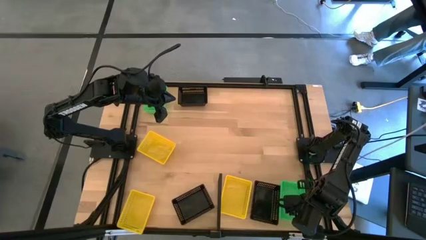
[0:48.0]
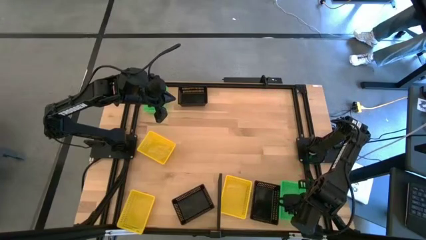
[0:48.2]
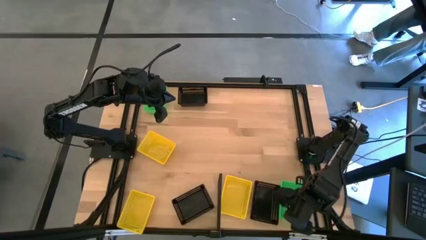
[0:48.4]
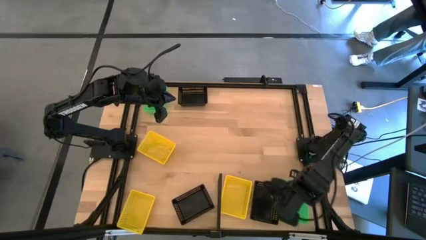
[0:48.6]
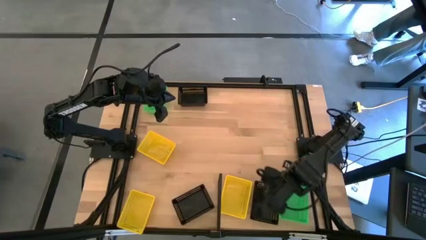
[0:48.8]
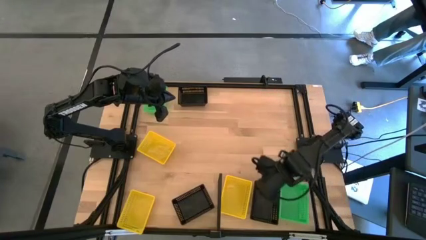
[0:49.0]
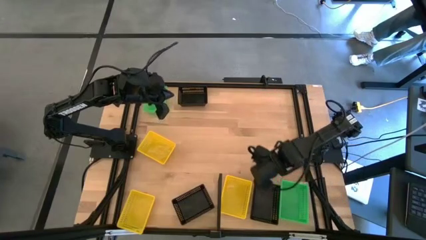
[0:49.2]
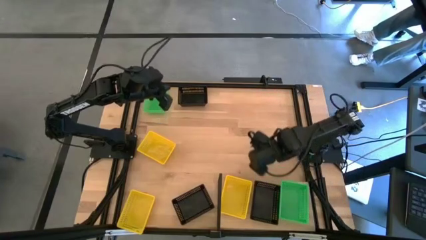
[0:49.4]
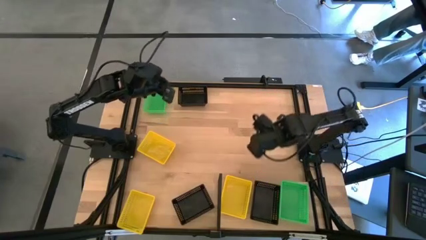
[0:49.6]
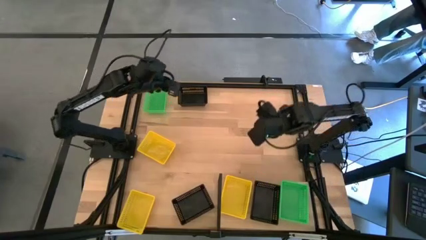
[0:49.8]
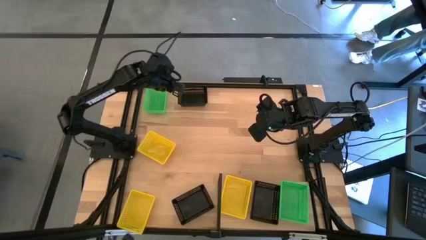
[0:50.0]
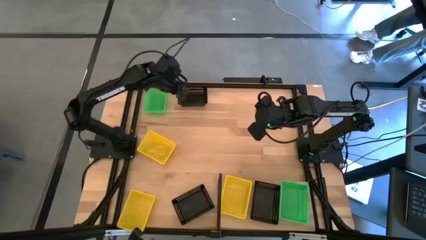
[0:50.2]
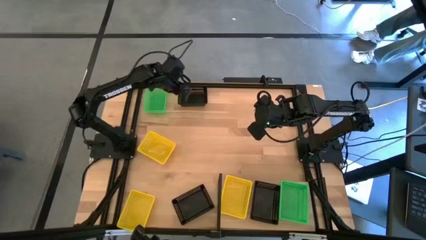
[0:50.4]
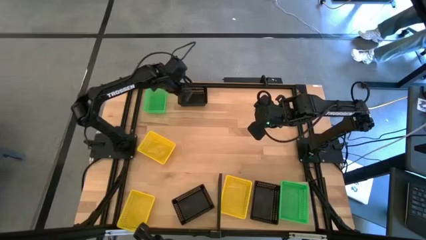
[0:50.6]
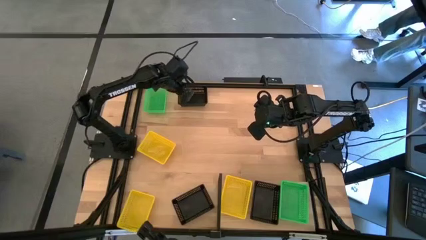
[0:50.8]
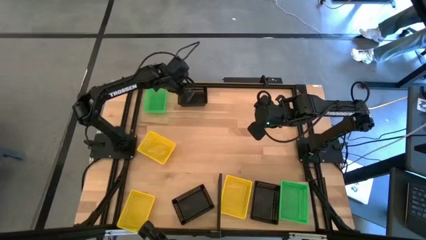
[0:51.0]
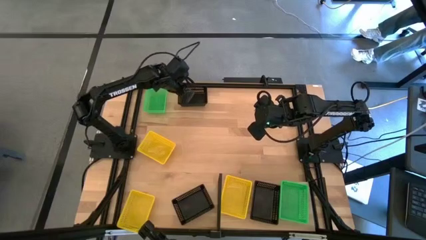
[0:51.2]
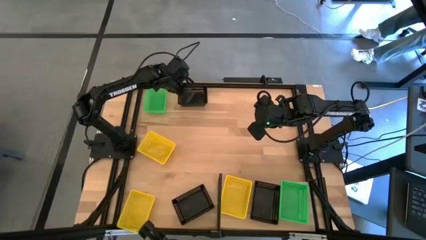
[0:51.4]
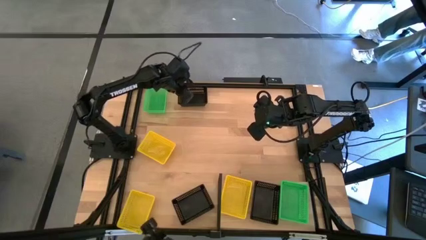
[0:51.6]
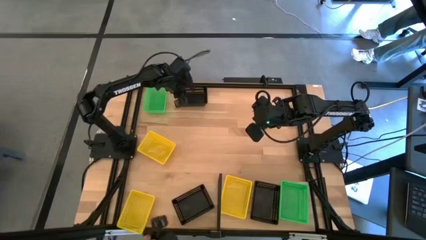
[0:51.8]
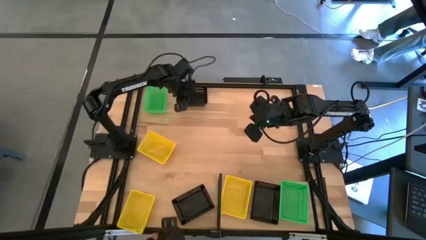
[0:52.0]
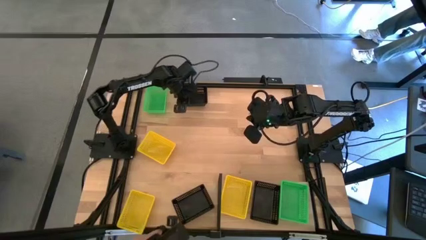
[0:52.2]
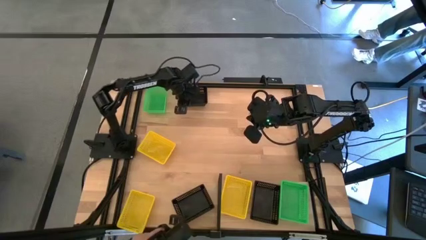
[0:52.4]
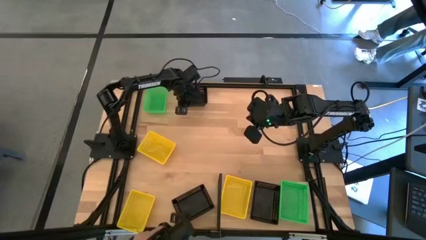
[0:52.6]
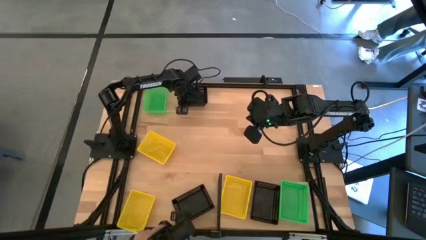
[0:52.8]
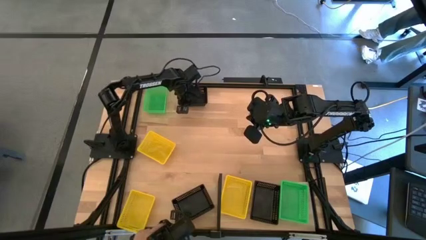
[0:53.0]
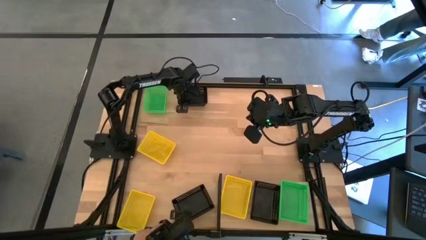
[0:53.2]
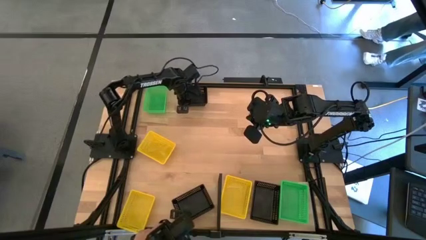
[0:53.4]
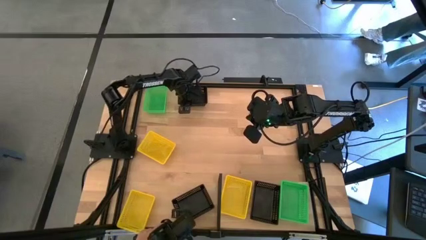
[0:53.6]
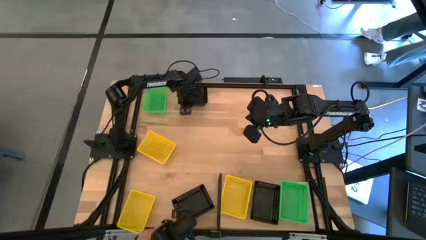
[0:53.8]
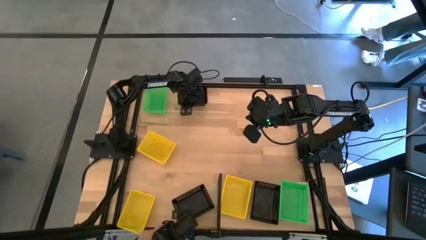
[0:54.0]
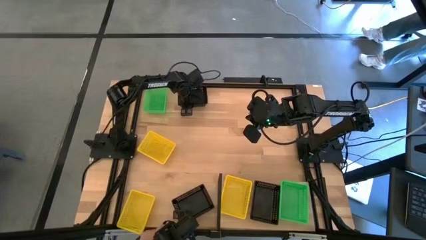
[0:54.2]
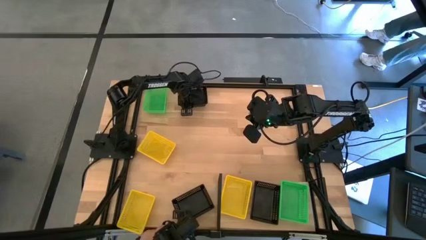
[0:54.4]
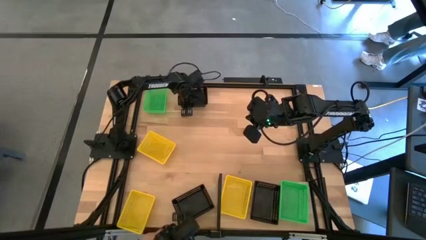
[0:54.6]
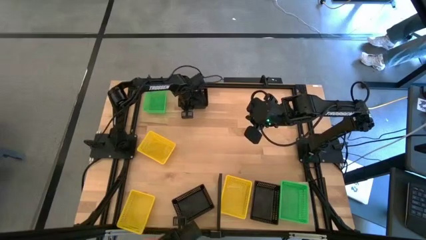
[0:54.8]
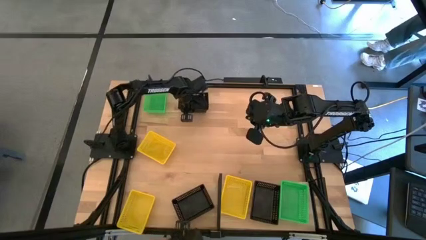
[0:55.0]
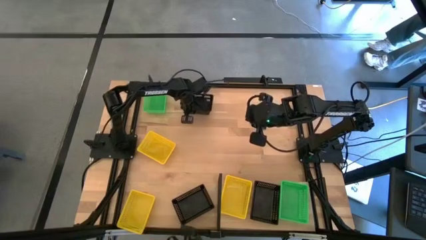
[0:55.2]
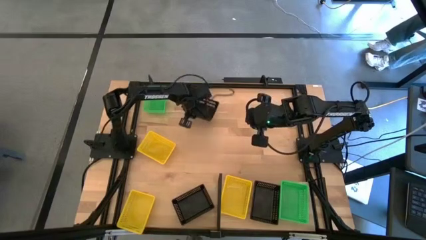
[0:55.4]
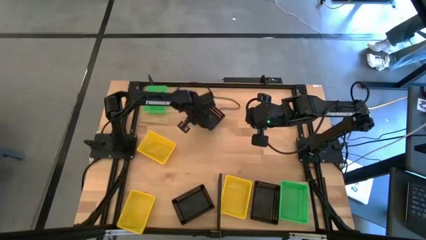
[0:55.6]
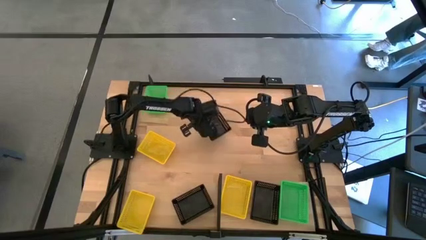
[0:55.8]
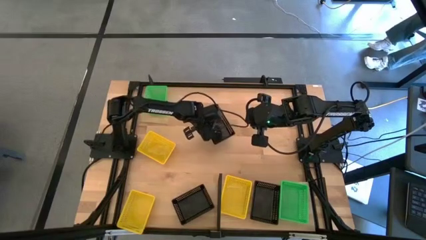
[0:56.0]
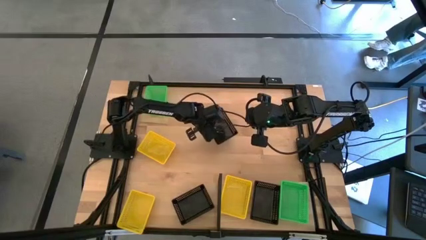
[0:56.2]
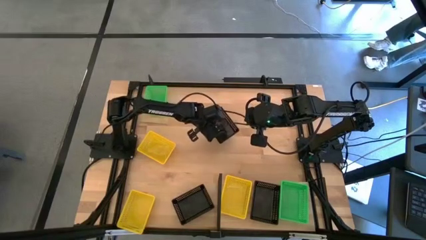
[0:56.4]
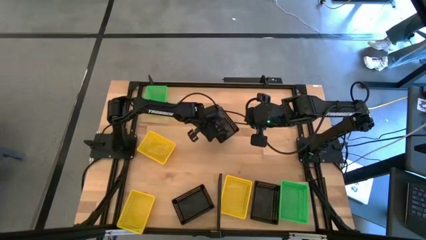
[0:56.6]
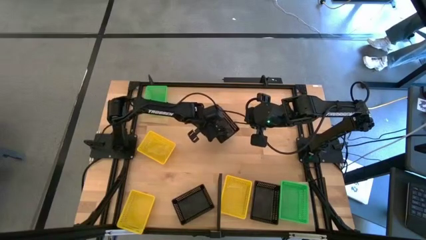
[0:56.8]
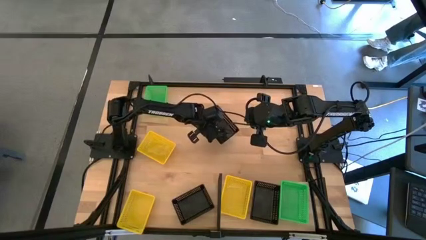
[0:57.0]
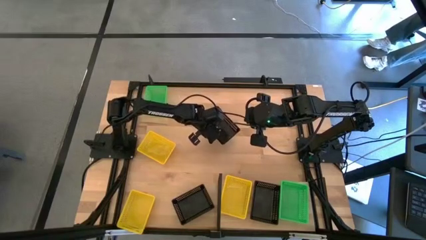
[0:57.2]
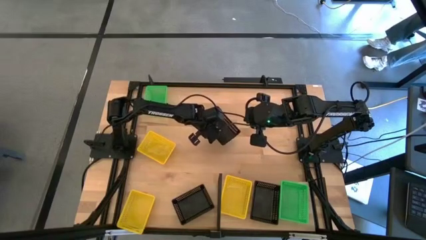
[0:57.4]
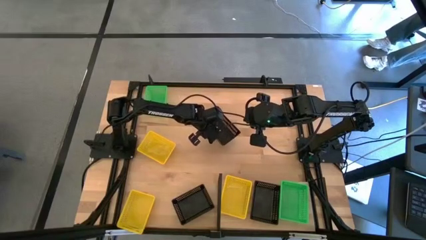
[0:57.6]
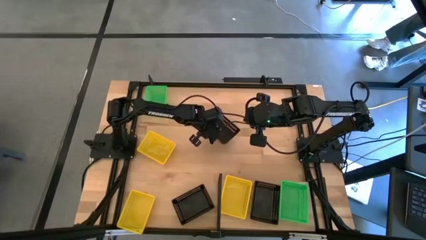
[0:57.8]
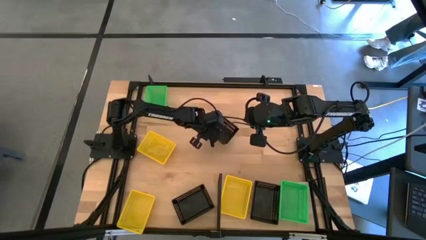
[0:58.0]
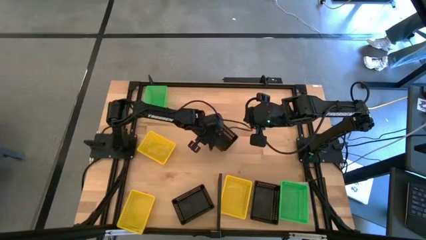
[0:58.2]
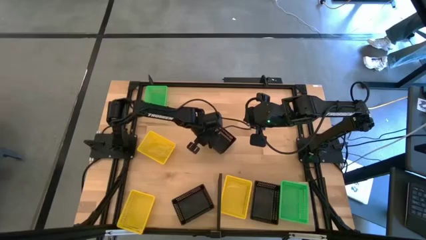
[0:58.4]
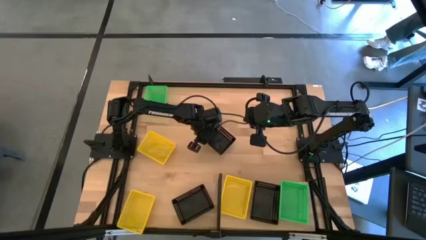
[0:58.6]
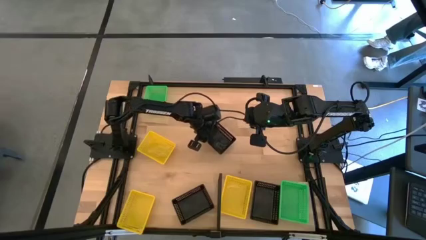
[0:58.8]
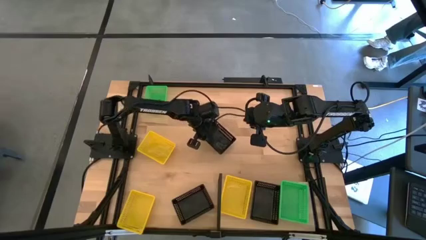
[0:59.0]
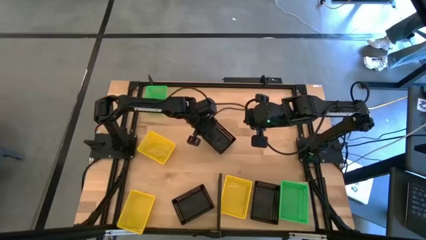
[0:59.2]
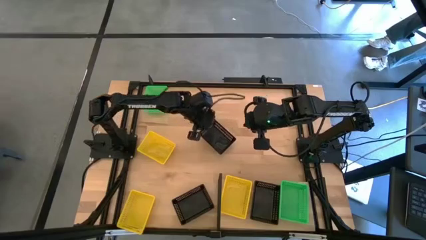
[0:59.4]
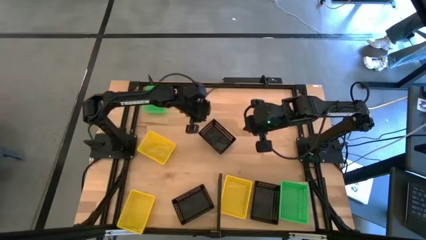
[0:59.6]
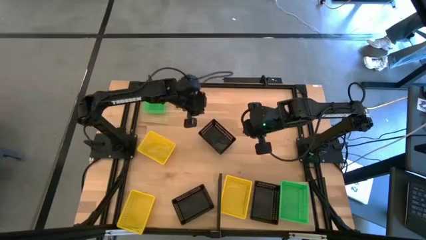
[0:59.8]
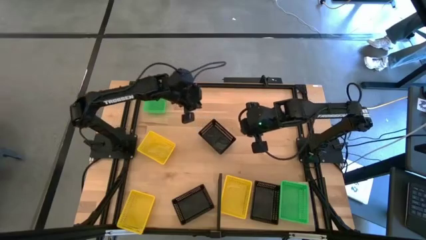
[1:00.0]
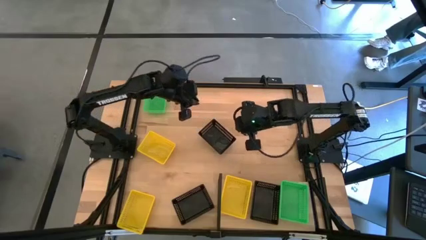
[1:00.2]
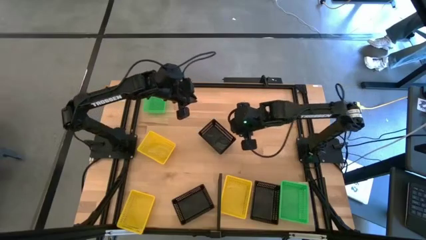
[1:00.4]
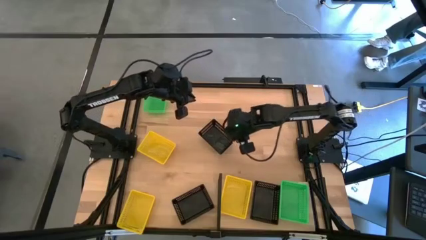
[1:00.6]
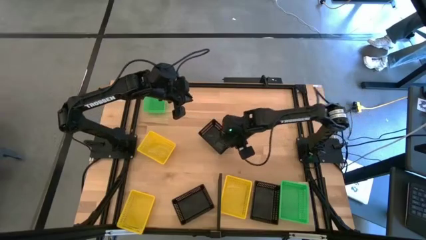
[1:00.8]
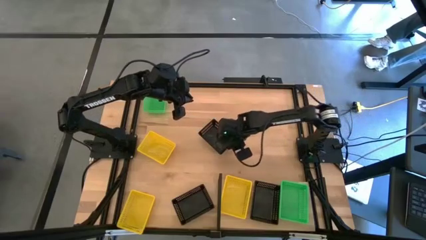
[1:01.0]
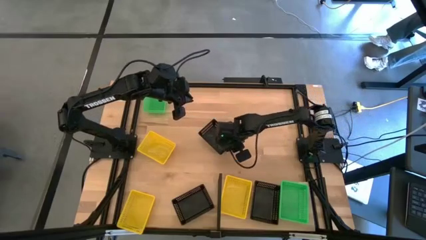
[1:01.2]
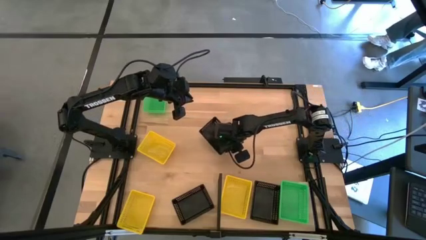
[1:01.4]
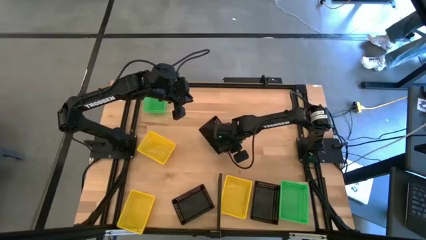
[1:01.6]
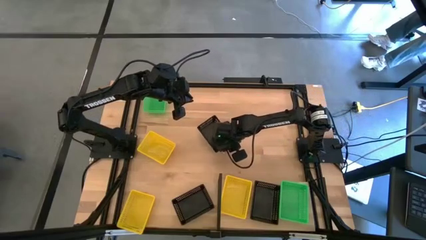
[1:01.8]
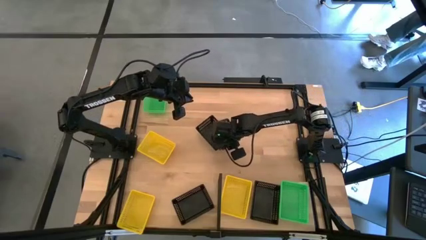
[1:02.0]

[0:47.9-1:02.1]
Task: Stack baskets on shelf by color
Stack the top black bin on top of the black bin on the shelf

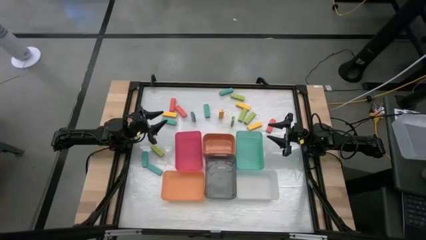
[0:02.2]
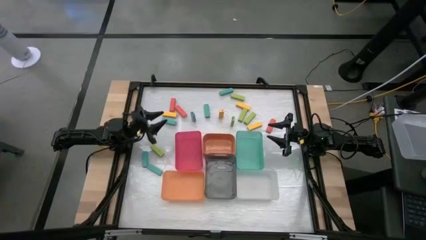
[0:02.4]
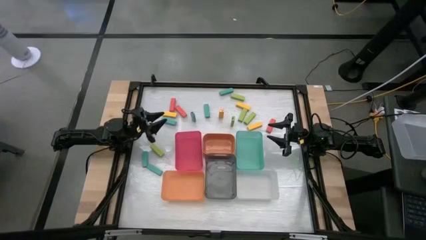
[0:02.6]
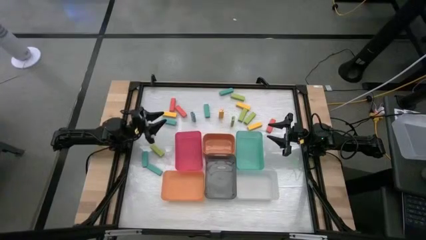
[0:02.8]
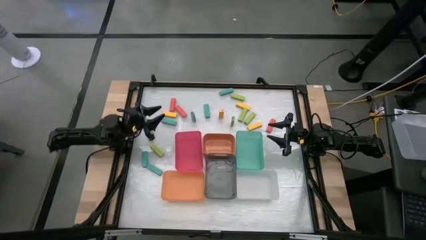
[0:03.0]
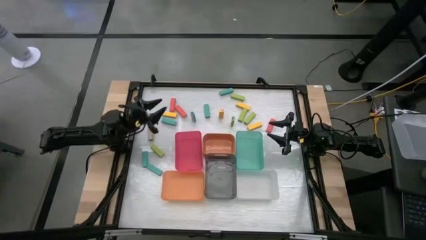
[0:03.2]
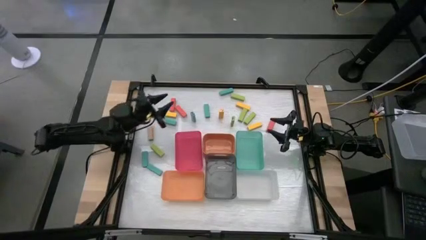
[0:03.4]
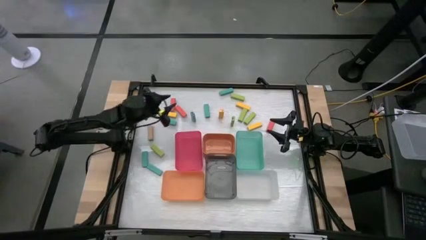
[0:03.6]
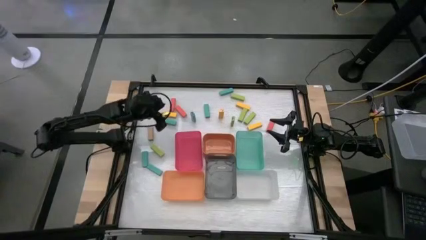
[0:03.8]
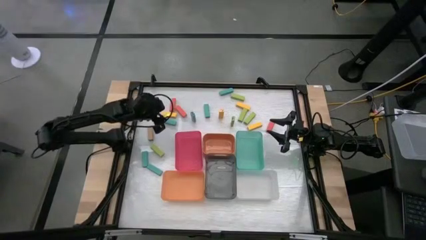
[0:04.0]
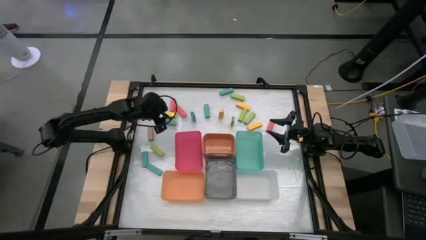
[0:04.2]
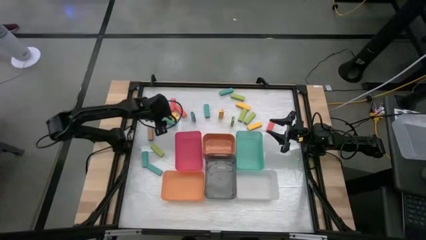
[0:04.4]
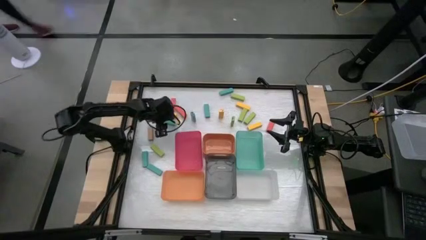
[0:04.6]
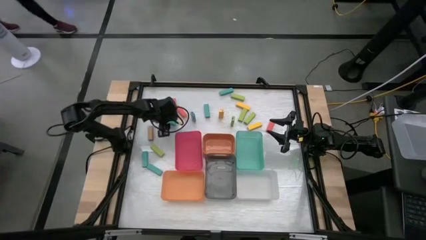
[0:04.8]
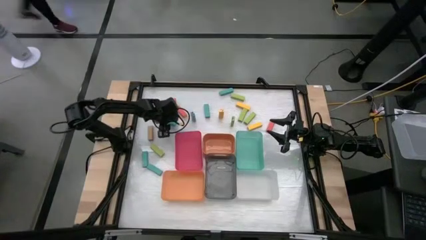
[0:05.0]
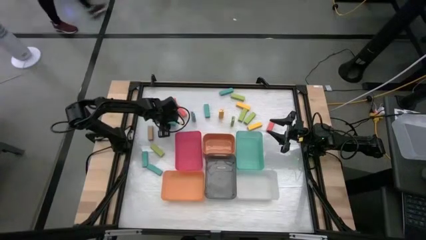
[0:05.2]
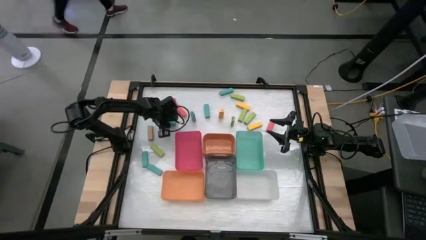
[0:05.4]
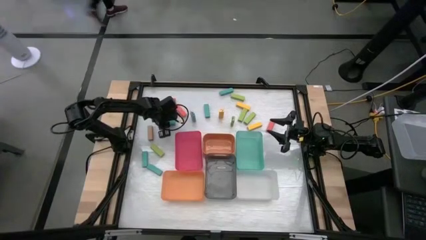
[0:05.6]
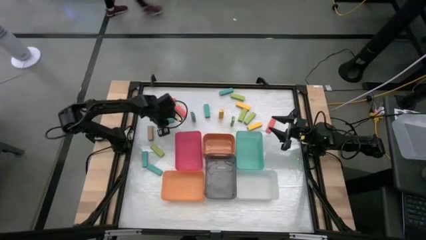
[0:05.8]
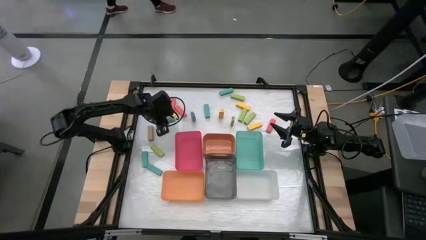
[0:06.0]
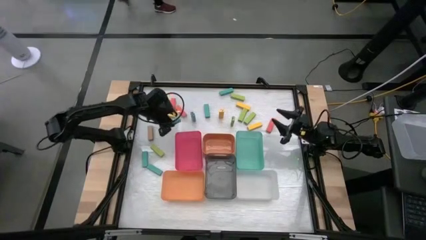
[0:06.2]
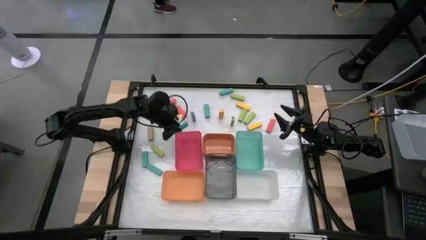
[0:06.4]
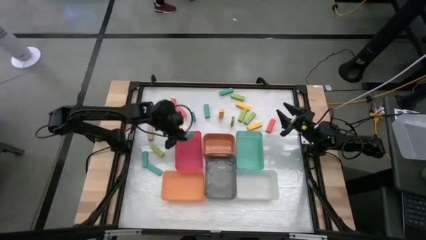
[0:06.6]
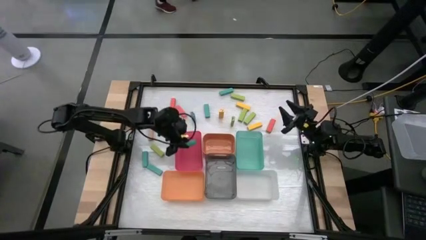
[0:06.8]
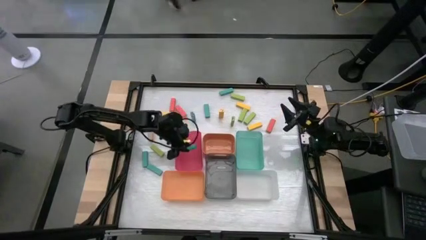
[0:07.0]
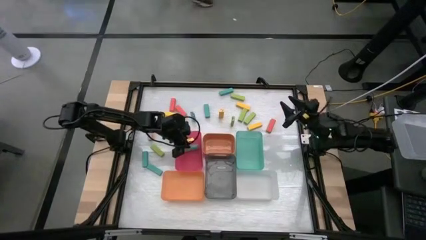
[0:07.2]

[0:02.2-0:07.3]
Task: Sort blocks
Put the blue block into the pink bin
